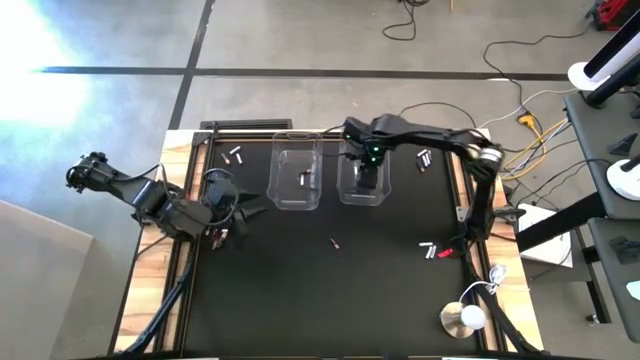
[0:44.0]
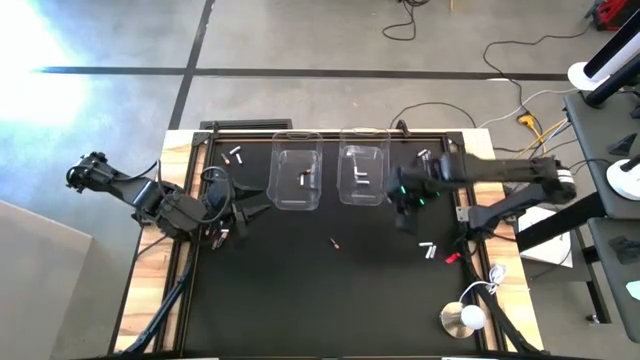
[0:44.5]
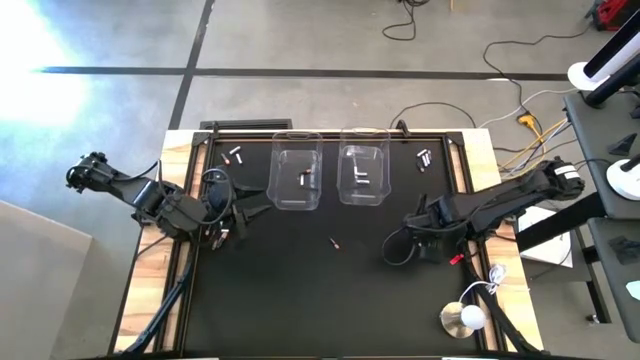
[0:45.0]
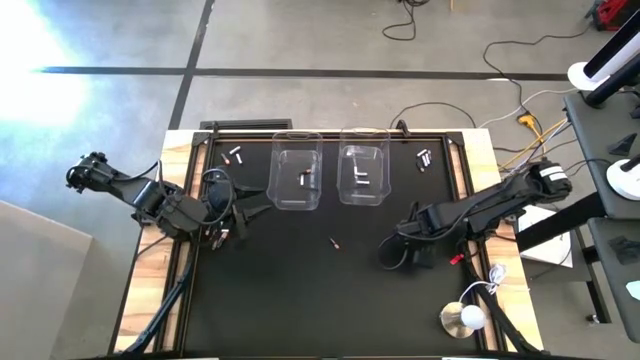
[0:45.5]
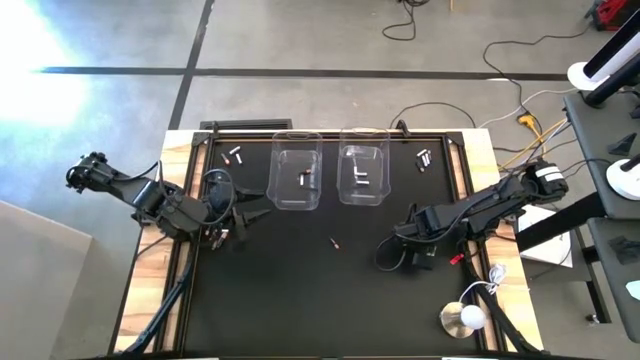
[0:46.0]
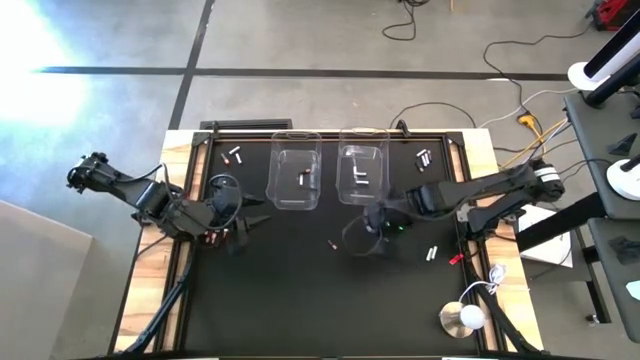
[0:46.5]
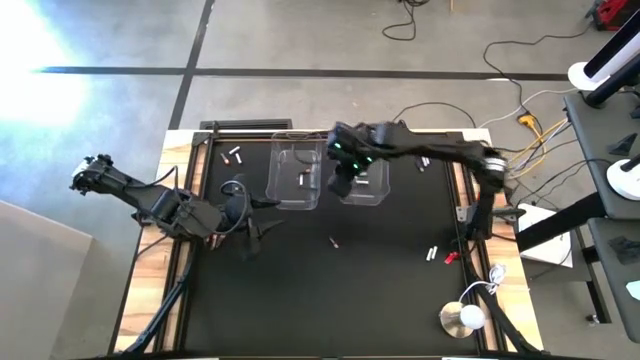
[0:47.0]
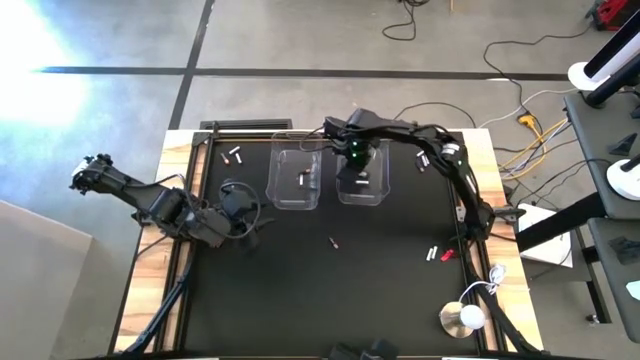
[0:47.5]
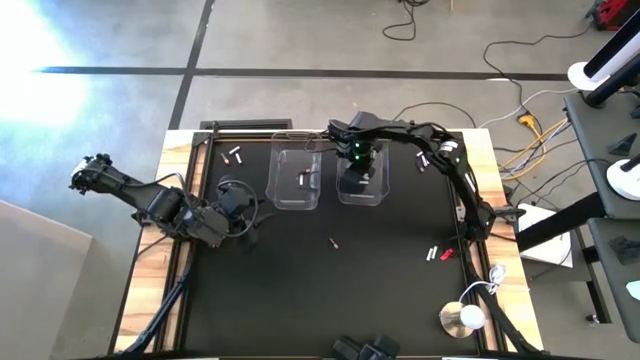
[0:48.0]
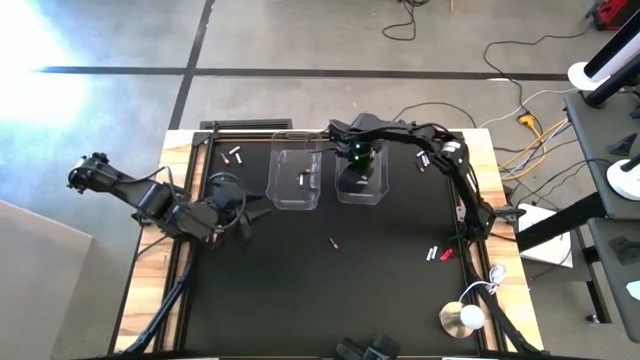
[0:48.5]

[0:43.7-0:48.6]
Task: Sort batteries
Put the white battery into the right transparent bin

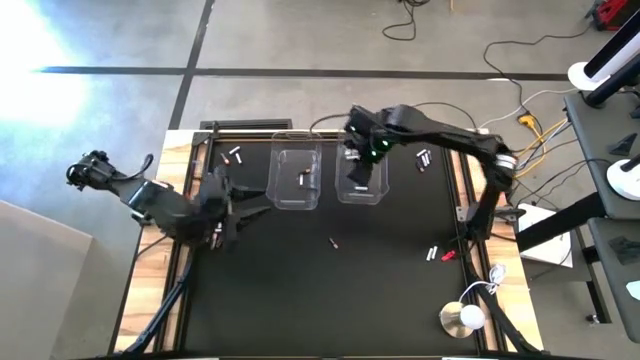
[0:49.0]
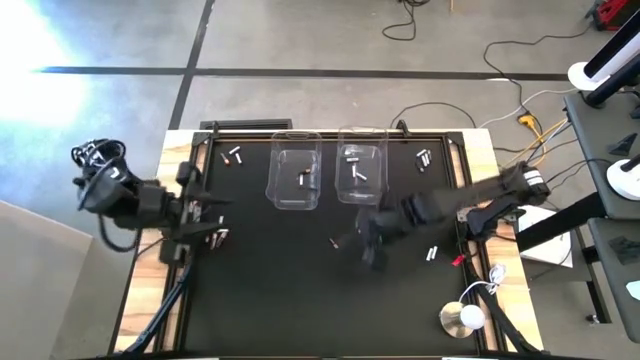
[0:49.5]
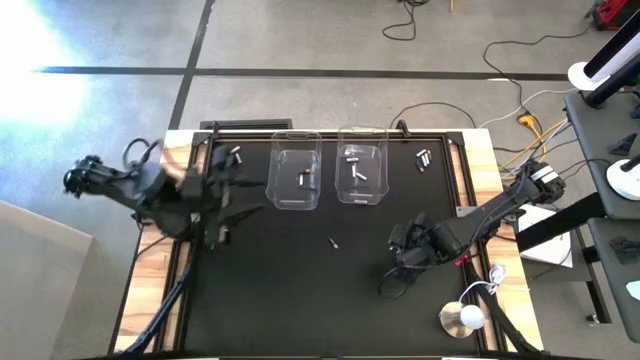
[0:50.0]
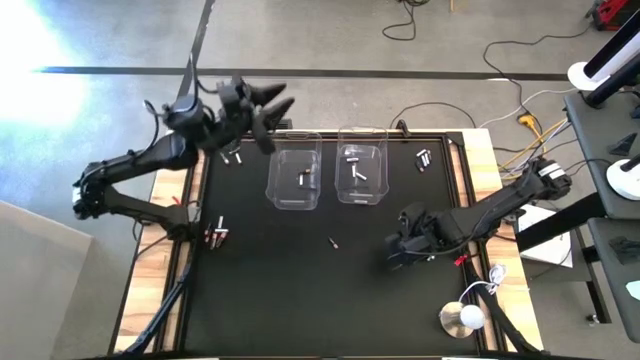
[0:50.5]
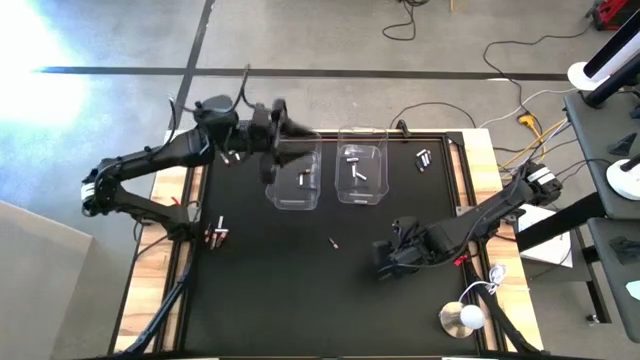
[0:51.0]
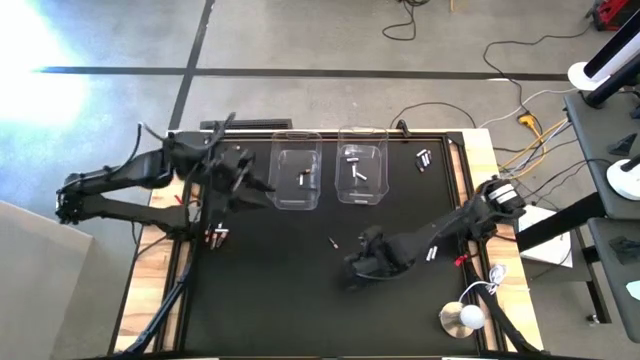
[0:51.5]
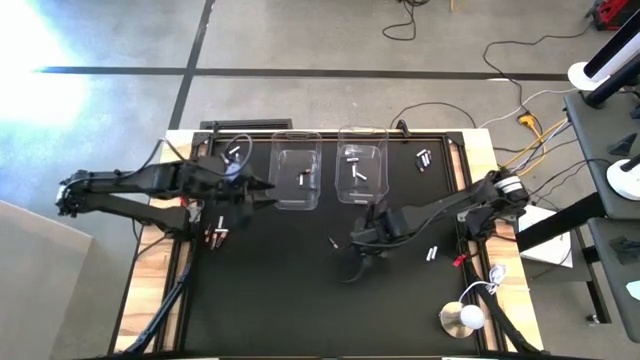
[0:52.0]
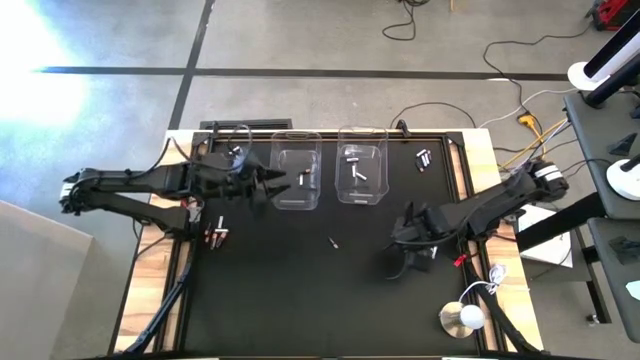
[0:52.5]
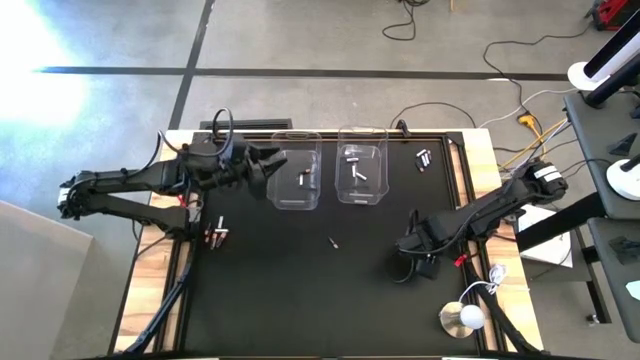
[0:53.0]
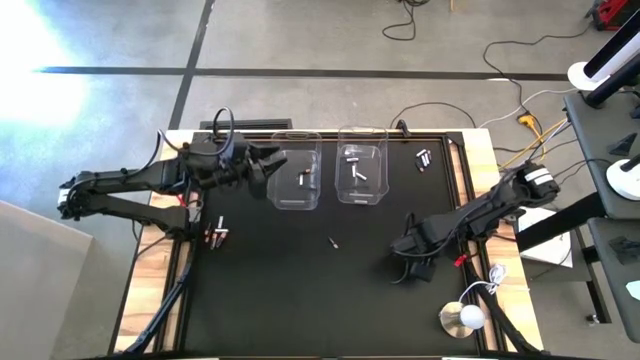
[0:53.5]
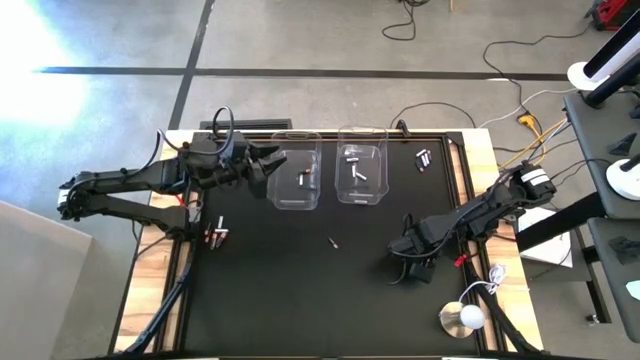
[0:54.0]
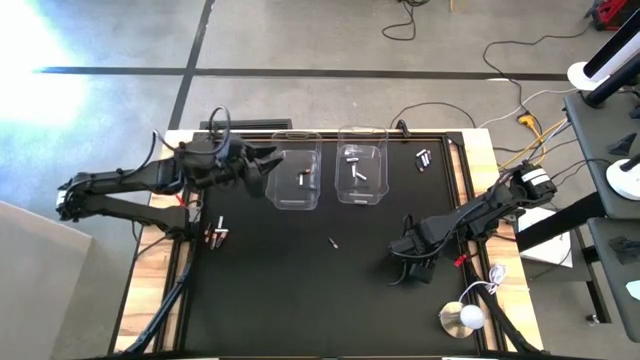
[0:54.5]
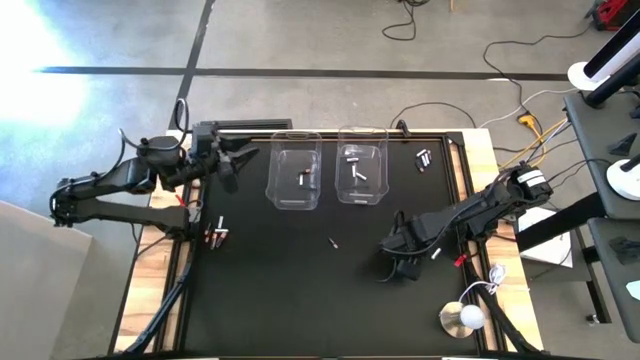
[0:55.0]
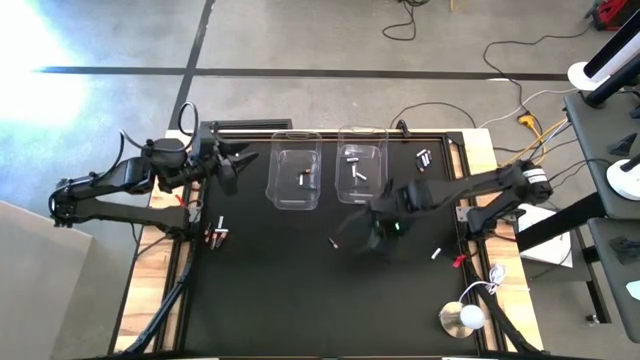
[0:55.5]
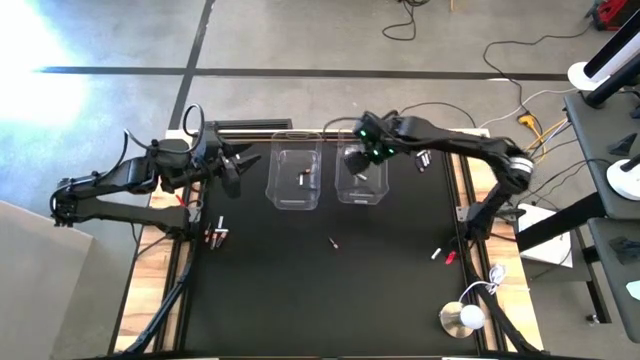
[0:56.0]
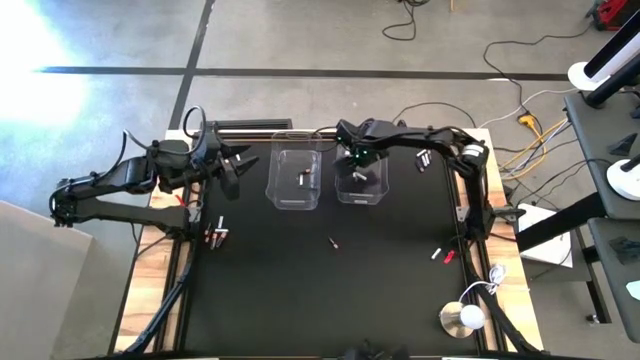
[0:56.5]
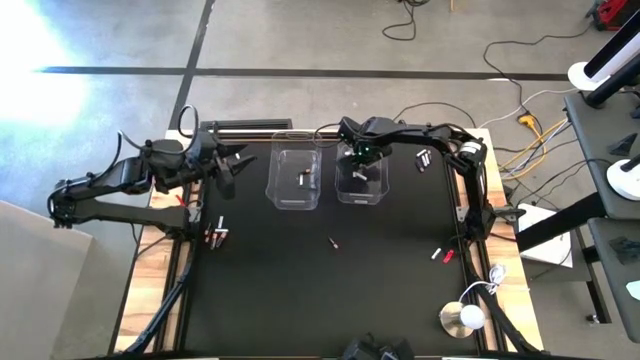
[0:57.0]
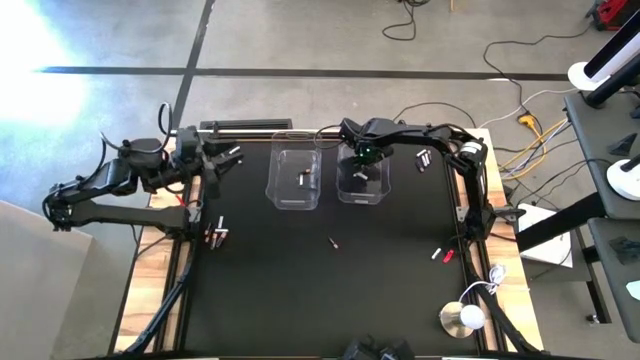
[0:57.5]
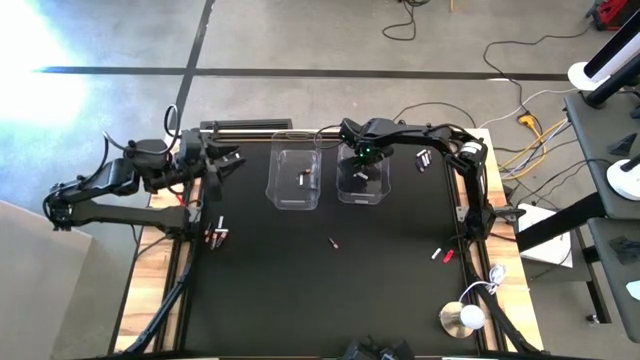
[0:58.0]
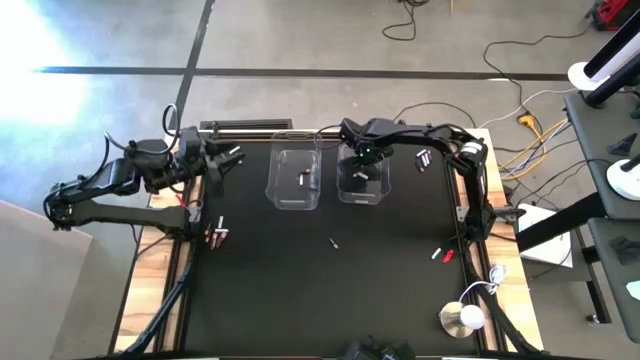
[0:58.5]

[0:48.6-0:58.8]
Put the white battery into the right transparent bin

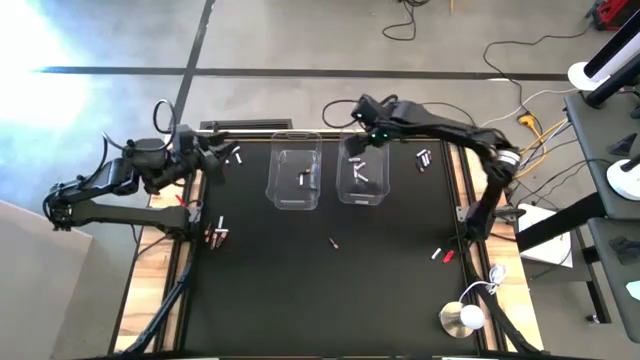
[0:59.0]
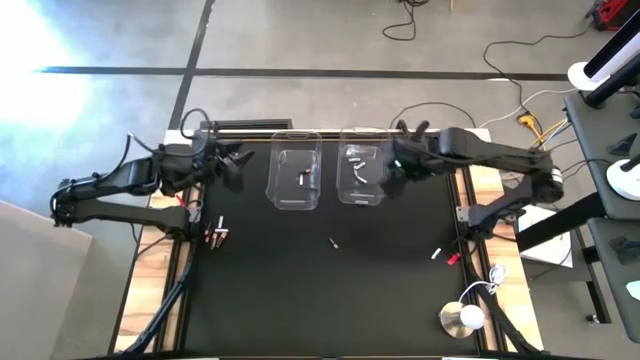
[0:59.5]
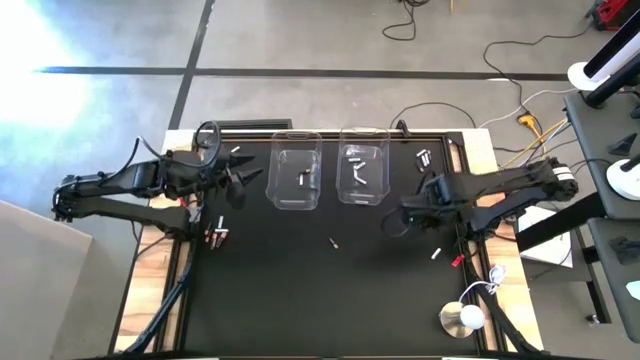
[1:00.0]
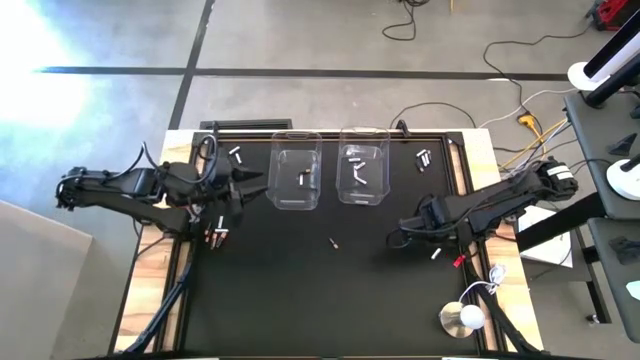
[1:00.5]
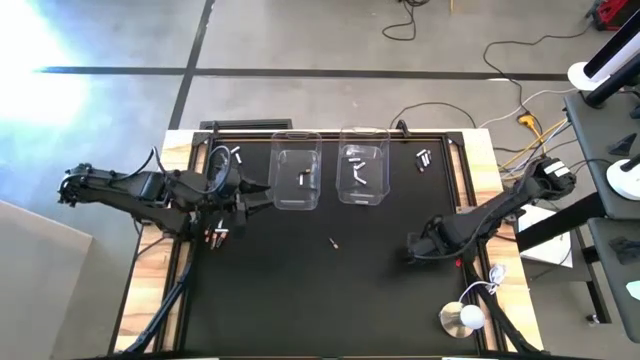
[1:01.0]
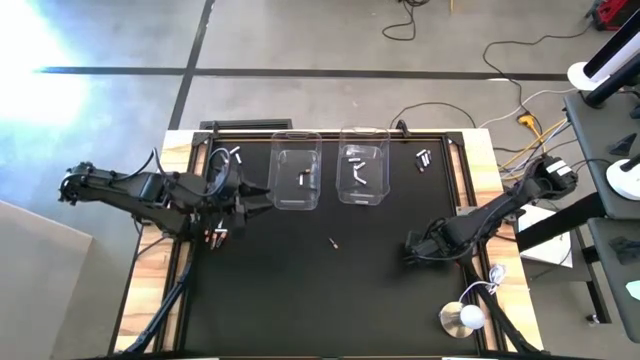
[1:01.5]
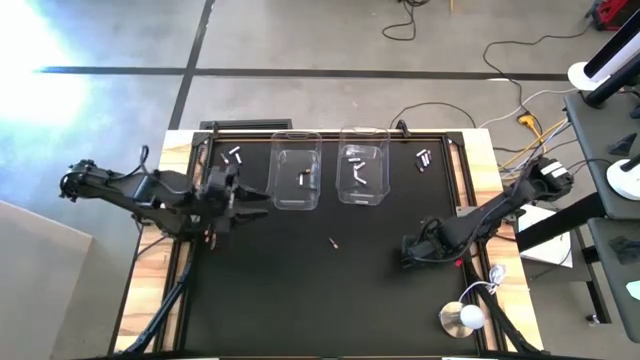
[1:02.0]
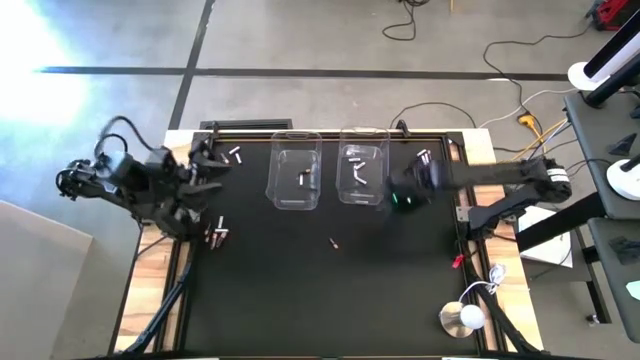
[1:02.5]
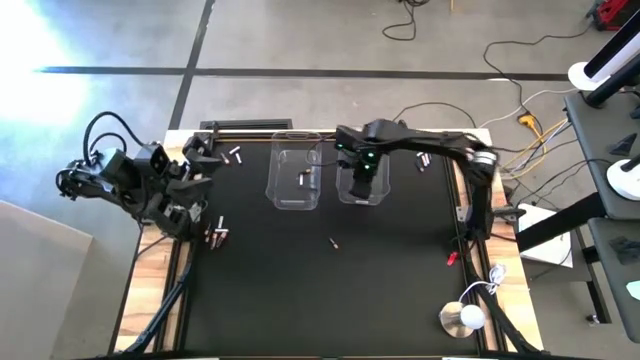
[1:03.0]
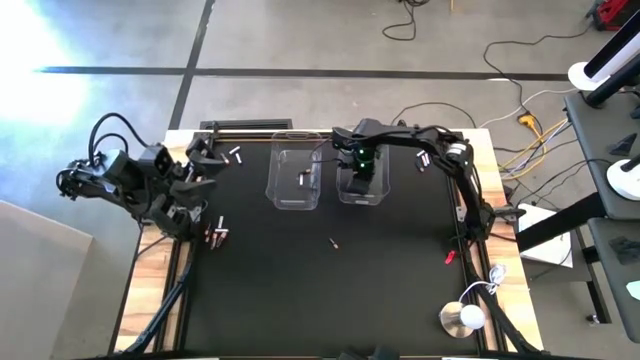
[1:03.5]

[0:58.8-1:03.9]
Put the white battery into the right transparent bin

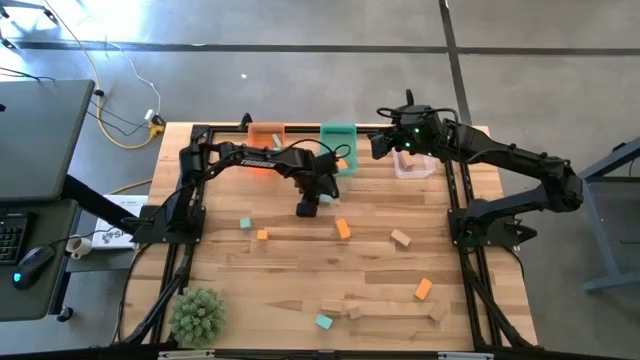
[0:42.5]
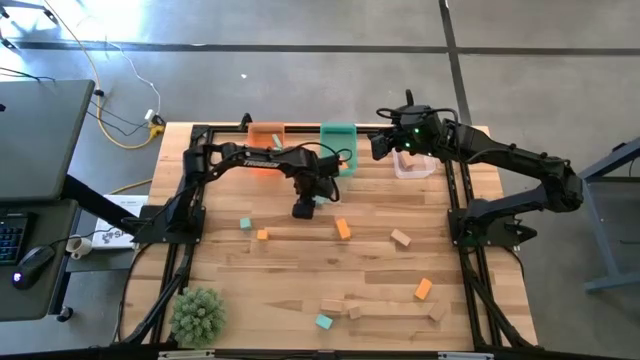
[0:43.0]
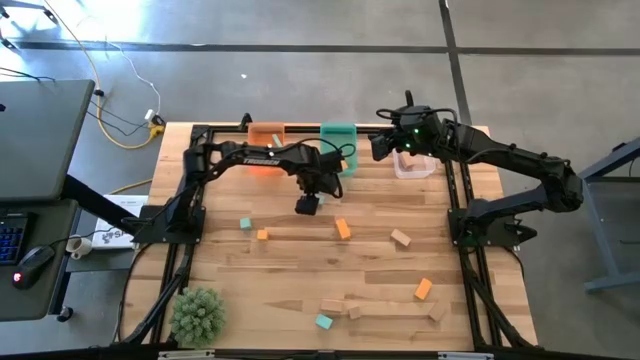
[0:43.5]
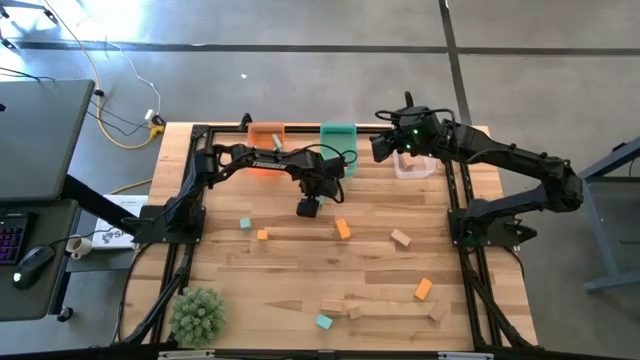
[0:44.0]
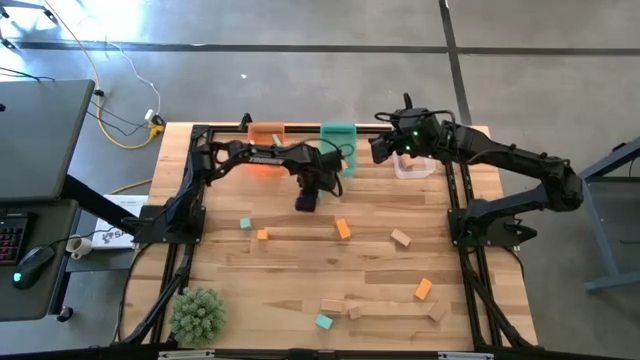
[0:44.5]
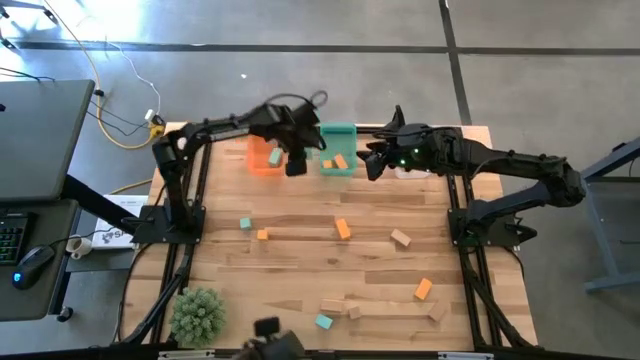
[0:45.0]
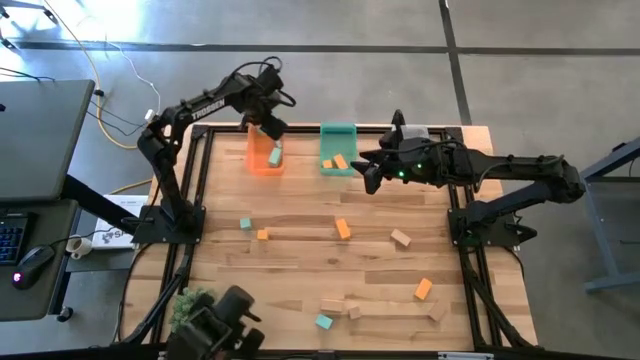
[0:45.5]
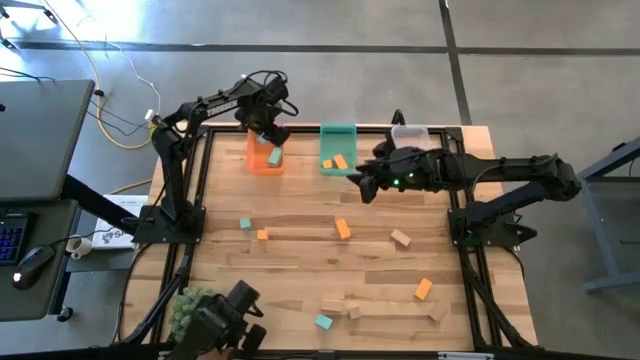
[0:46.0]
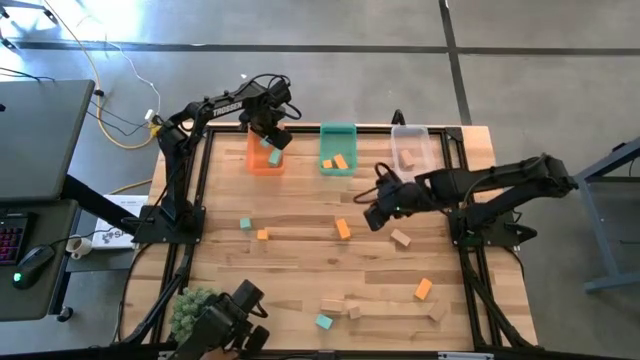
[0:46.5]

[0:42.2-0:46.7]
Task: Sort & place blocks by color
Put the light blue block into the orange bin
